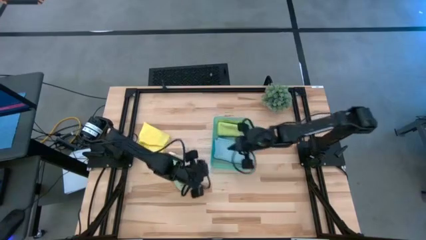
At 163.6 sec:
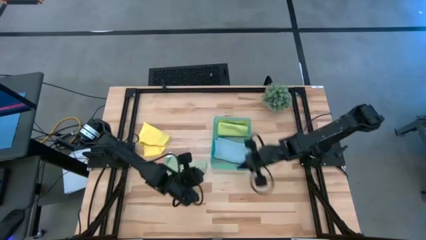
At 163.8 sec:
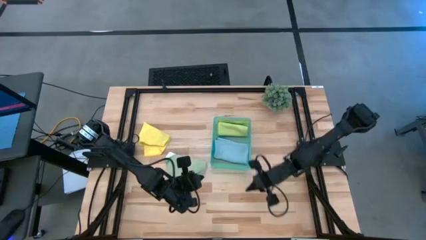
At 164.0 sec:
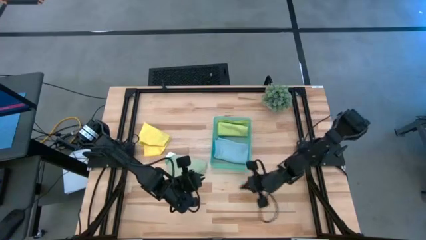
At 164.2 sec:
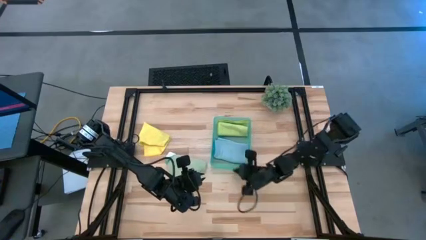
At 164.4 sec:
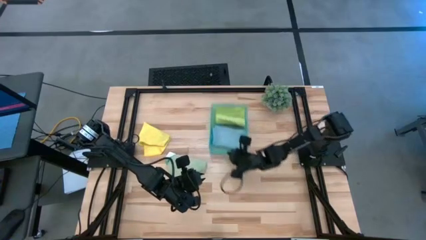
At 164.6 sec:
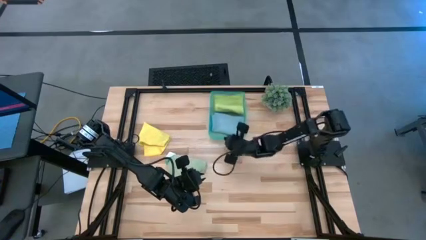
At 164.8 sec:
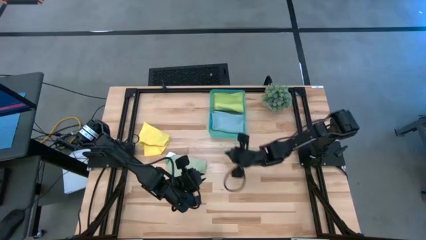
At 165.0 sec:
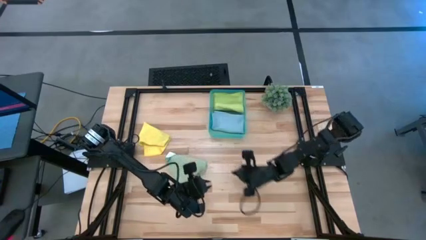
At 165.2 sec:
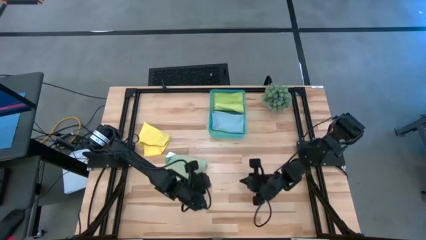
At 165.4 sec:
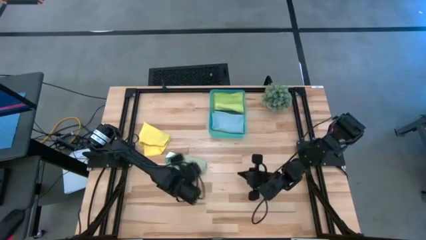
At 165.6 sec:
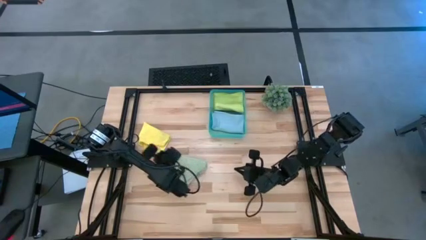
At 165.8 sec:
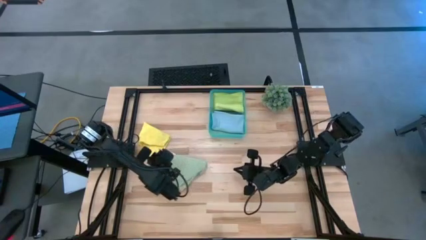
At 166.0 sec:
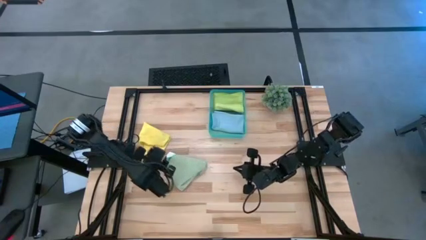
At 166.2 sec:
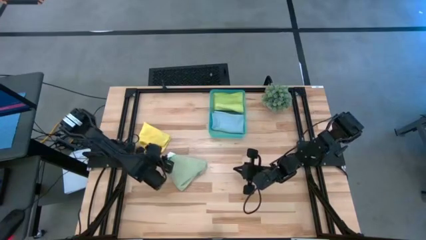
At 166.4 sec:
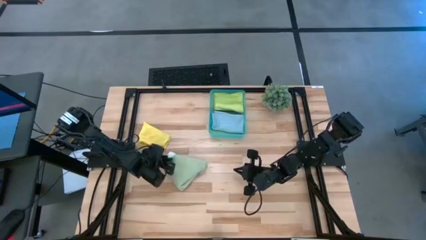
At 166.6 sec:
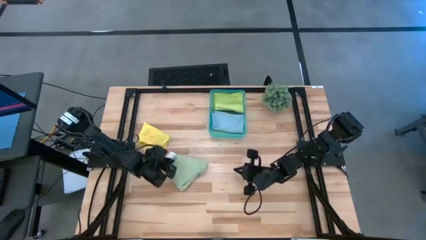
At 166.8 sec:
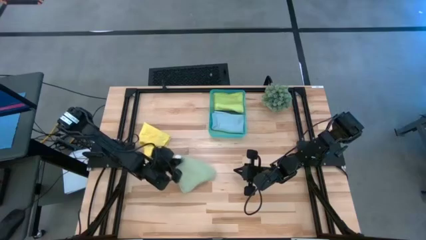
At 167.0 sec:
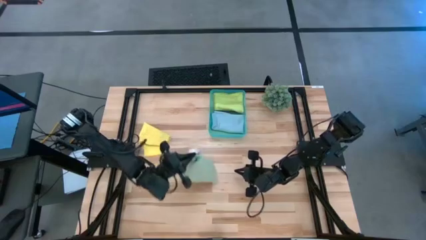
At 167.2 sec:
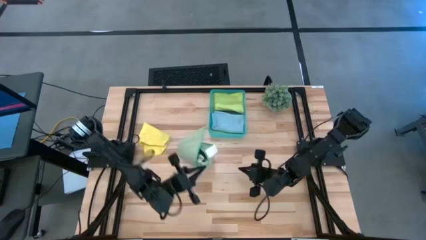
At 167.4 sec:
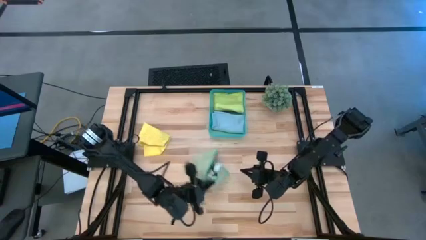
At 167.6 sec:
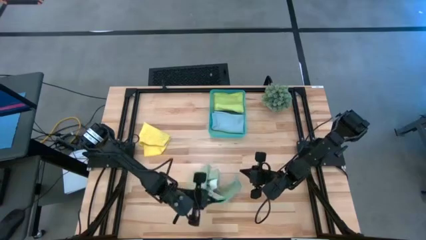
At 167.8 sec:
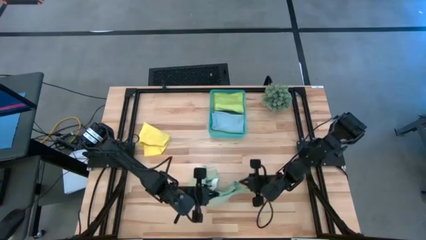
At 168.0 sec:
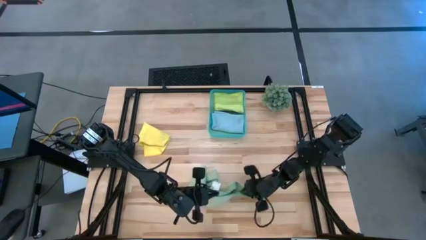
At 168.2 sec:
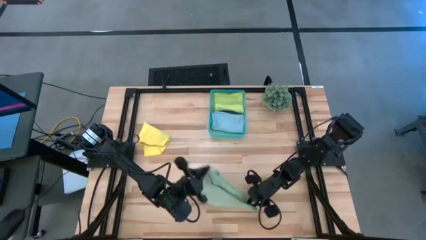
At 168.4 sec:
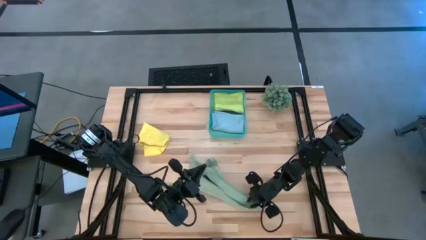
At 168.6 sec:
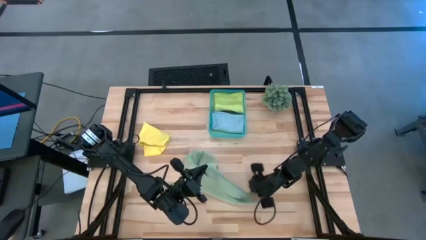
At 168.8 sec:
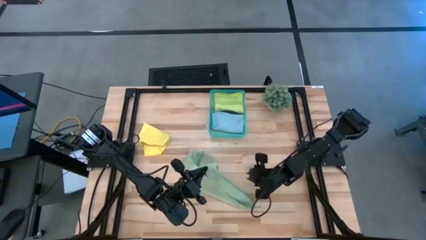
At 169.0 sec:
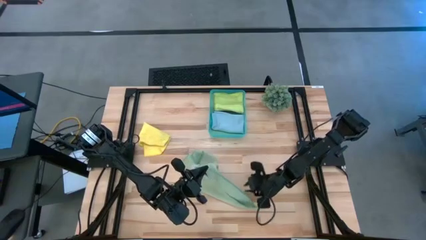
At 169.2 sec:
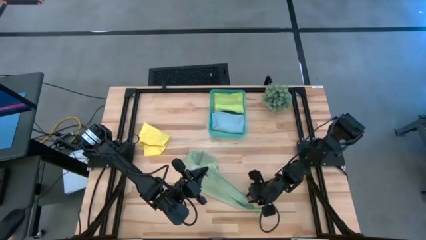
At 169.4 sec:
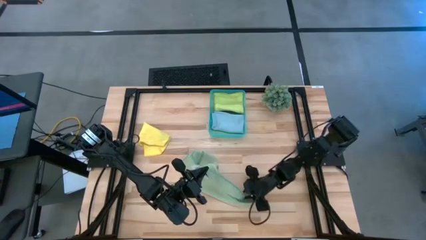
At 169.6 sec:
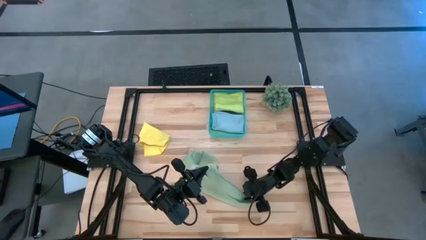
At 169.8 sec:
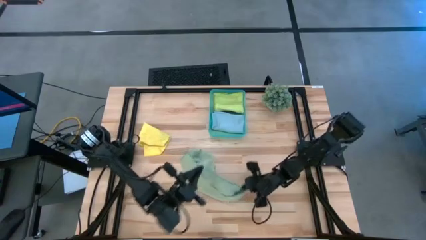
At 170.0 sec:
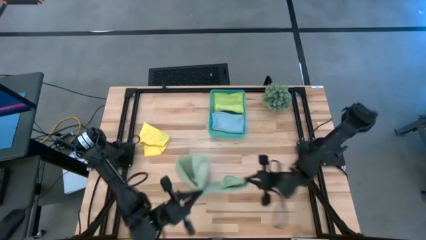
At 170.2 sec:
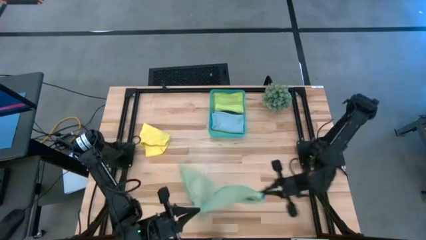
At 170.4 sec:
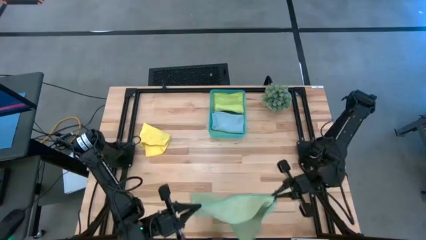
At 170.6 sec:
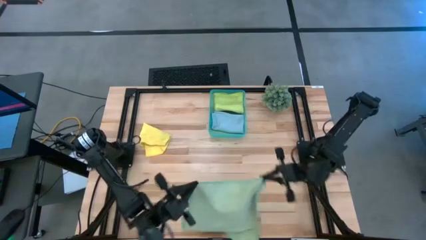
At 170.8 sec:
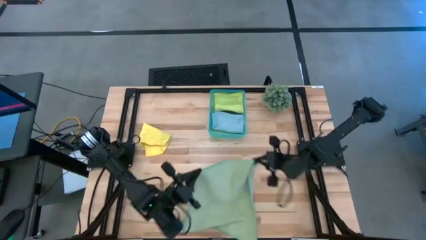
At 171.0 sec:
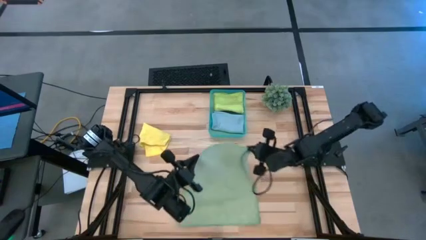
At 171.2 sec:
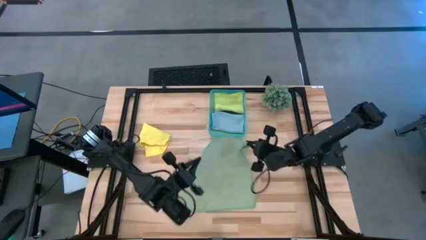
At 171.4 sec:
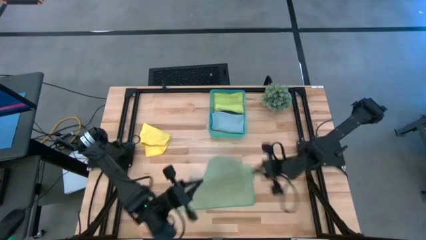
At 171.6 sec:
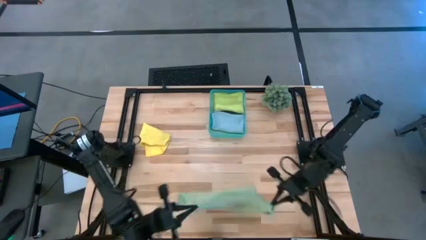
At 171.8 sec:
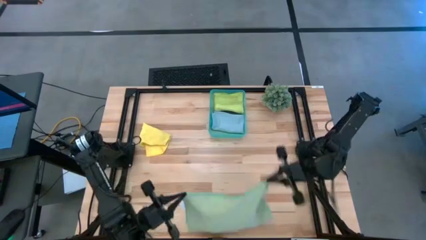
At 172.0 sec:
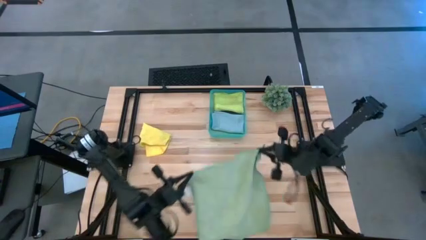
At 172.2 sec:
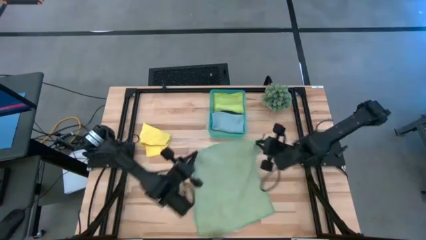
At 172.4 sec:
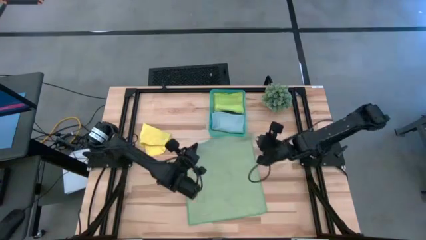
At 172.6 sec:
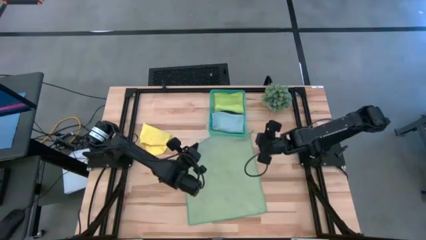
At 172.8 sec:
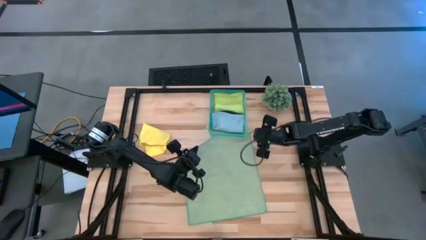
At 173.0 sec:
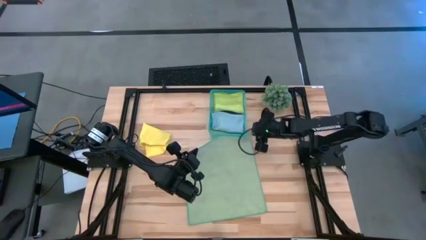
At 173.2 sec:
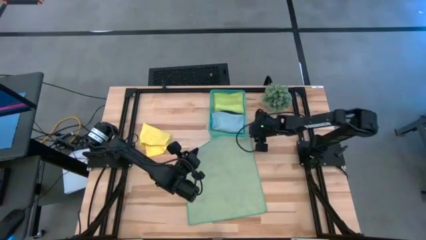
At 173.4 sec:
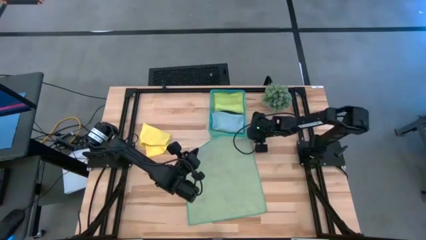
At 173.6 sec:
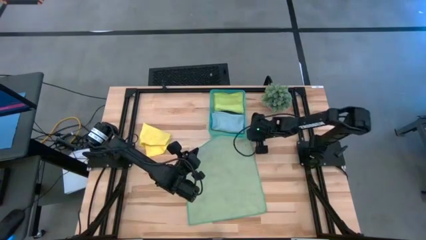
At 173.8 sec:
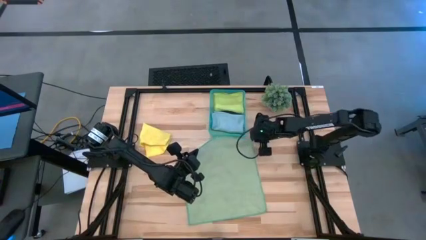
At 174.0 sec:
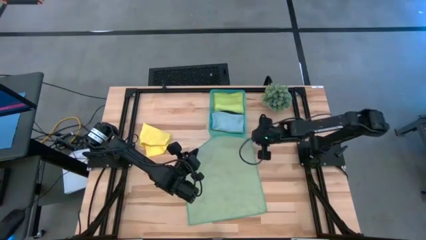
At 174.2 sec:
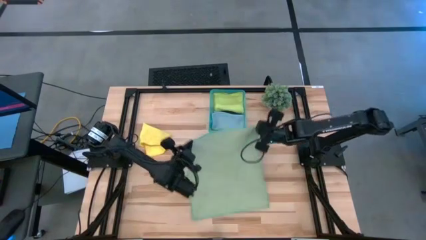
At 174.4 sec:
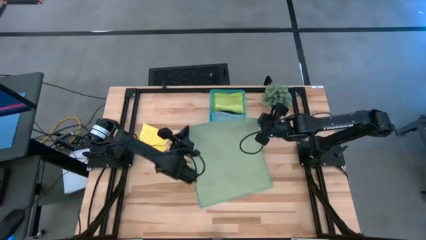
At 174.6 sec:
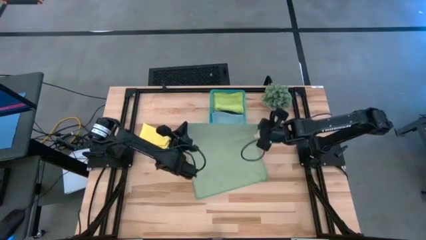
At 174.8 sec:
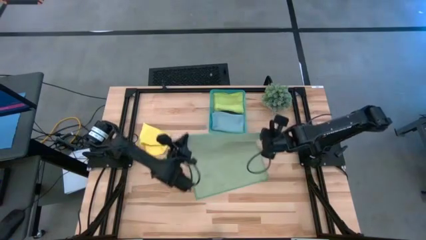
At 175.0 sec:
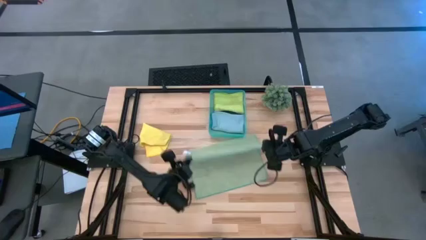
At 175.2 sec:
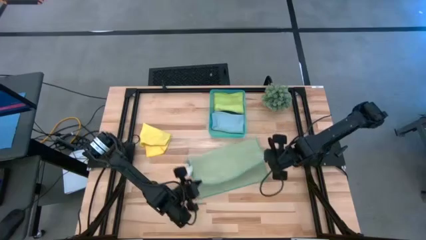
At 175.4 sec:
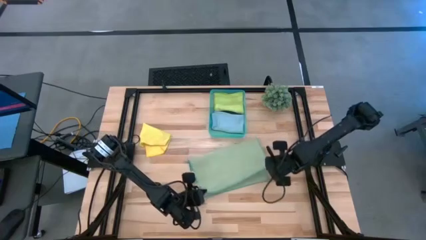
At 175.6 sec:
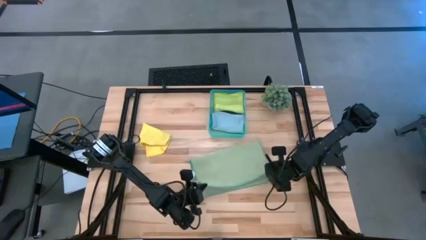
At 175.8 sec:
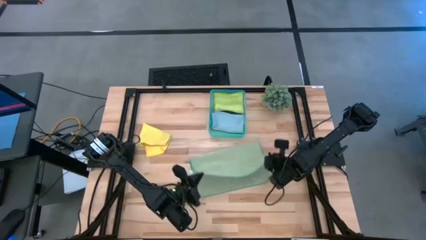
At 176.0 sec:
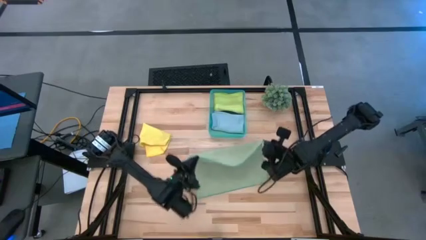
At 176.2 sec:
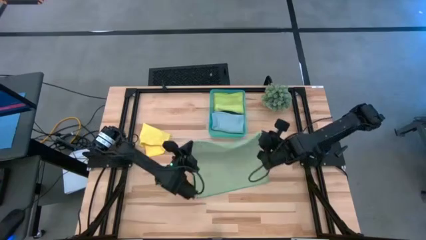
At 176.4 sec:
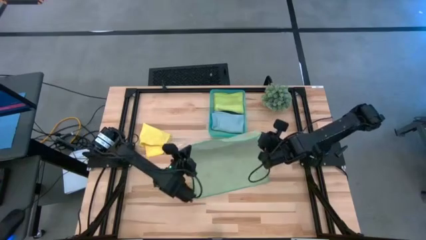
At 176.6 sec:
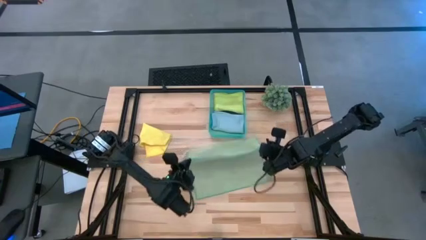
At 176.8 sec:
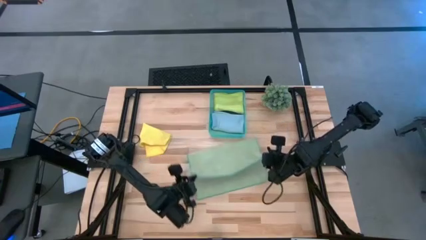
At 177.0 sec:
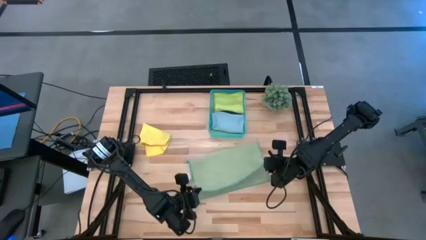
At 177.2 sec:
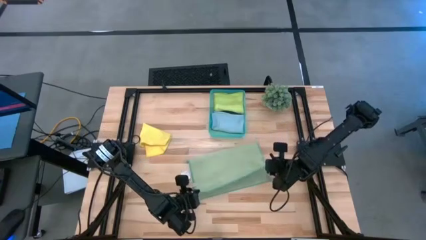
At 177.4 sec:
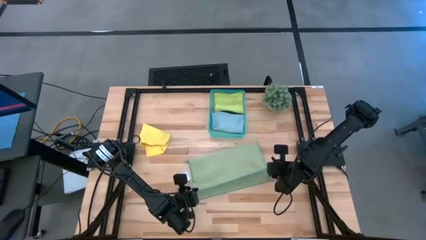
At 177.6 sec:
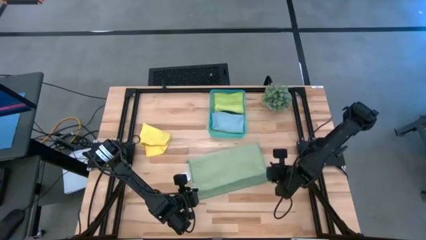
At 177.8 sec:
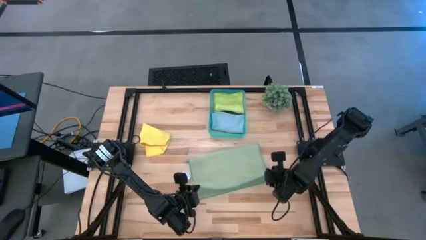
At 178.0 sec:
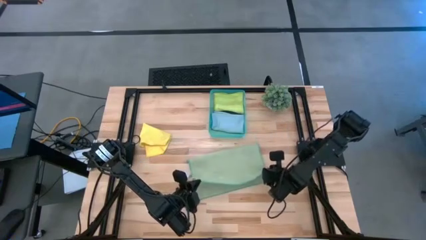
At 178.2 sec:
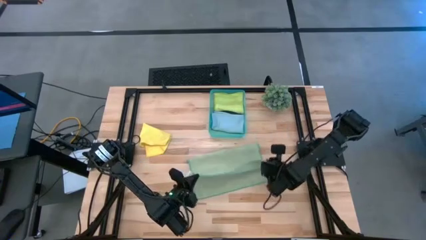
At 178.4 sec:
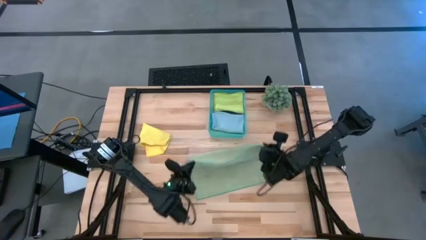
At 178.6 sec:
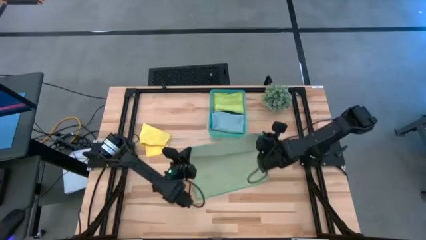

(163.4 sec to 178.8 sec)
Task: Fold microfiber towels
Fold the green microfiber cloth
